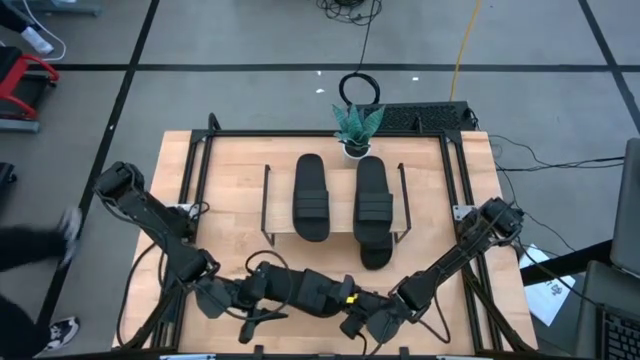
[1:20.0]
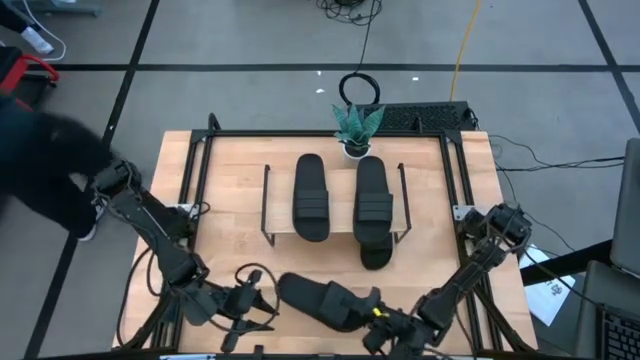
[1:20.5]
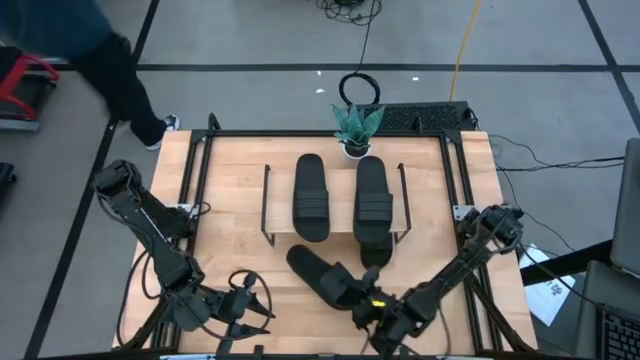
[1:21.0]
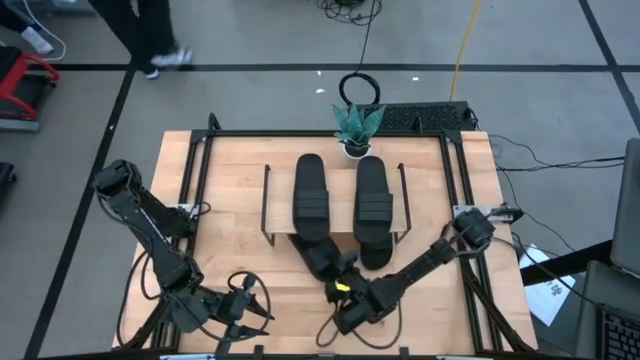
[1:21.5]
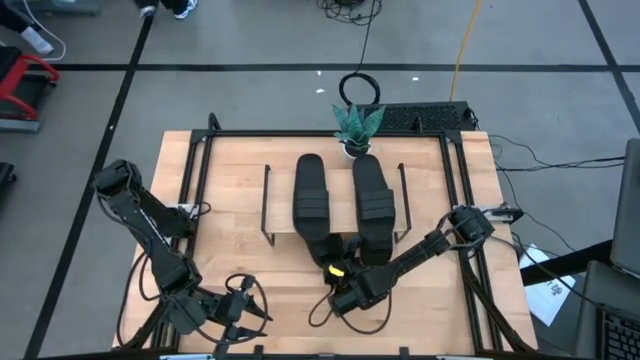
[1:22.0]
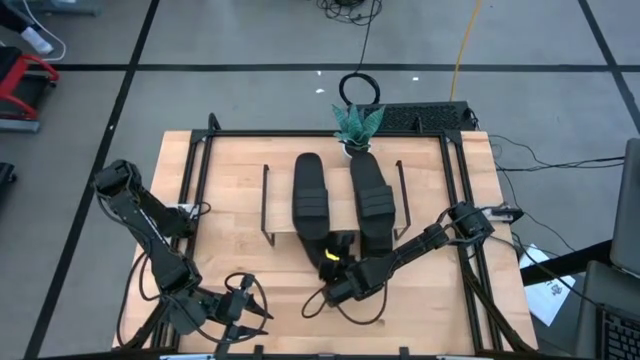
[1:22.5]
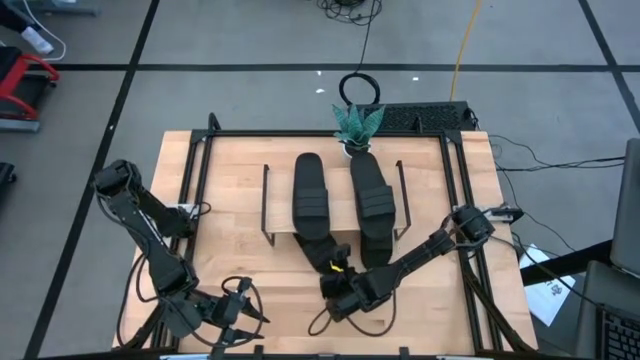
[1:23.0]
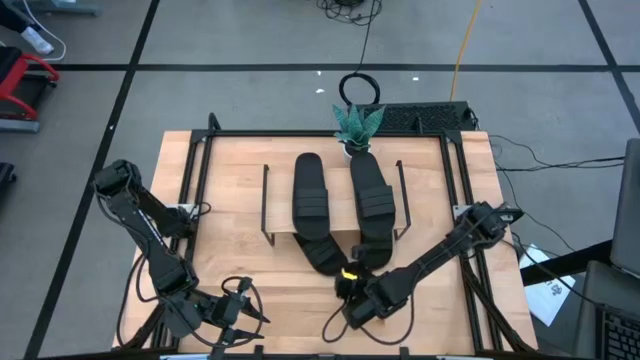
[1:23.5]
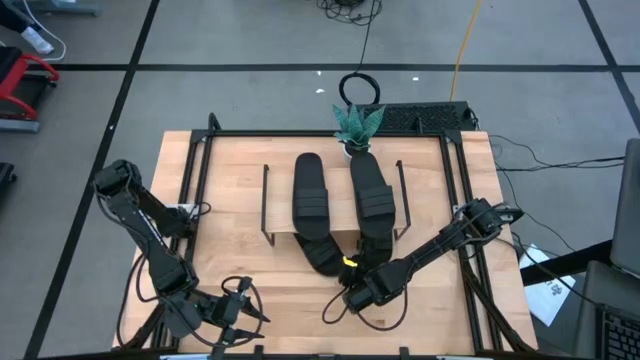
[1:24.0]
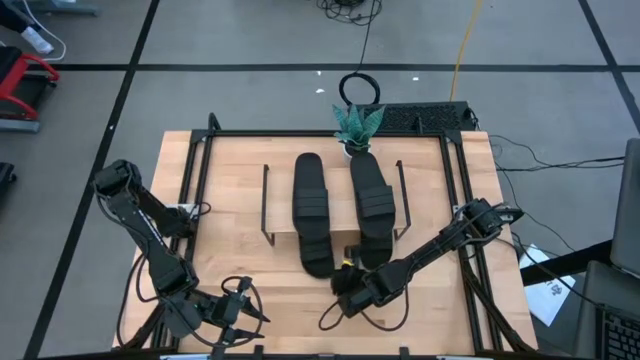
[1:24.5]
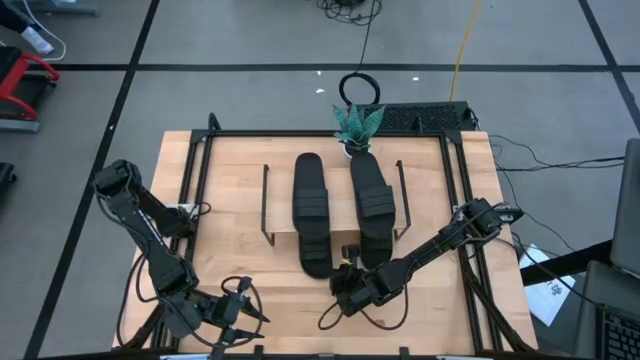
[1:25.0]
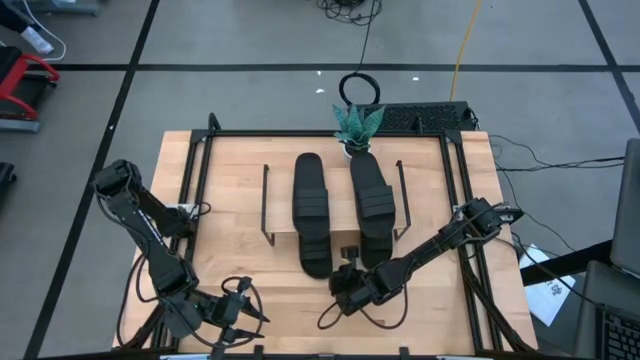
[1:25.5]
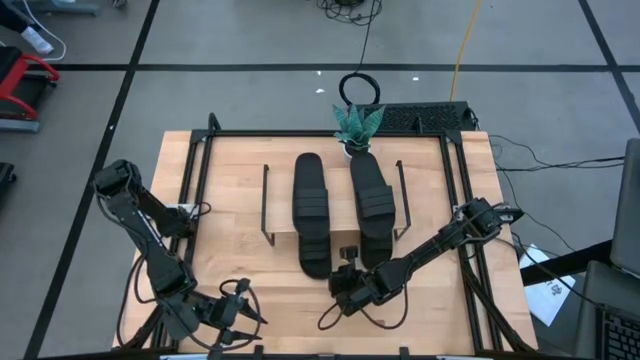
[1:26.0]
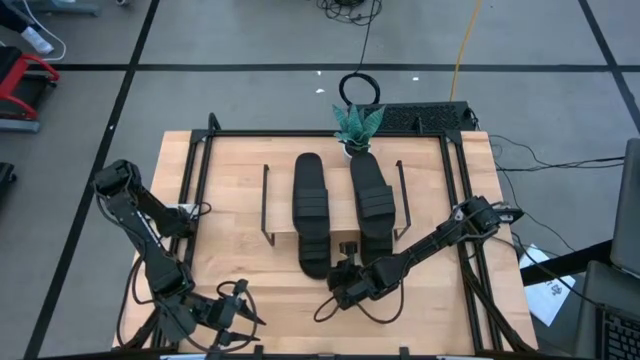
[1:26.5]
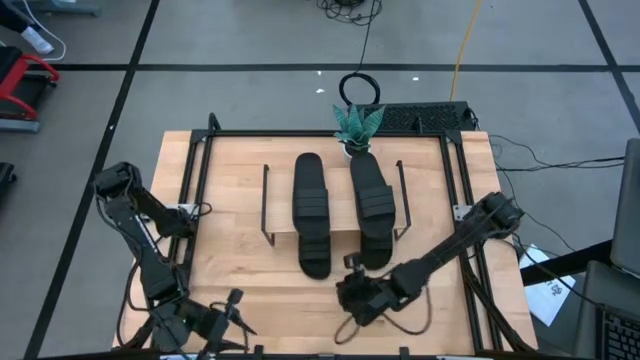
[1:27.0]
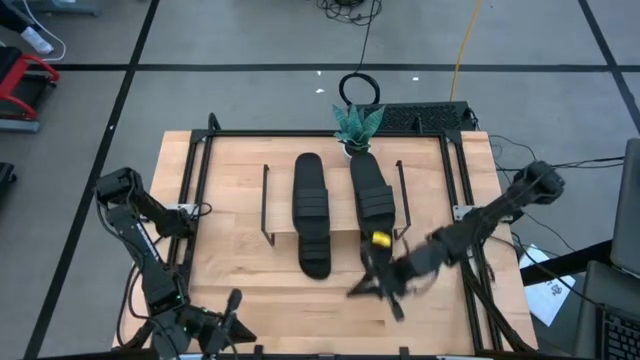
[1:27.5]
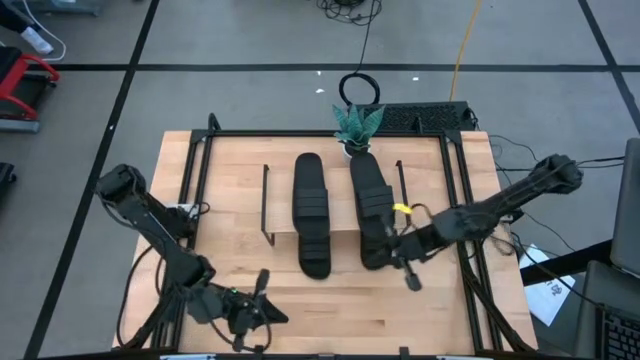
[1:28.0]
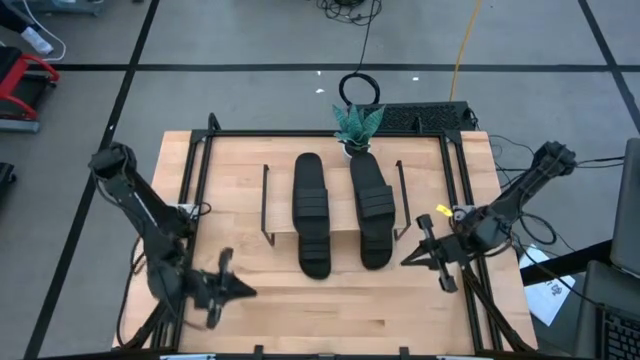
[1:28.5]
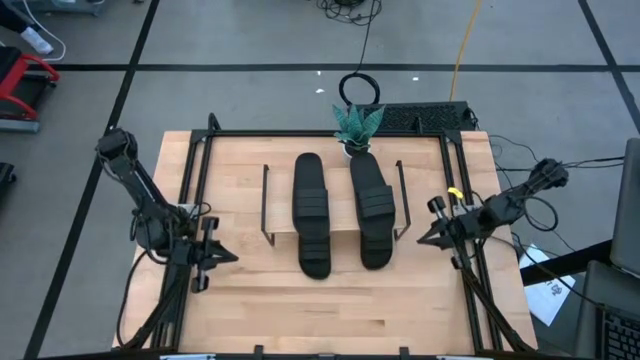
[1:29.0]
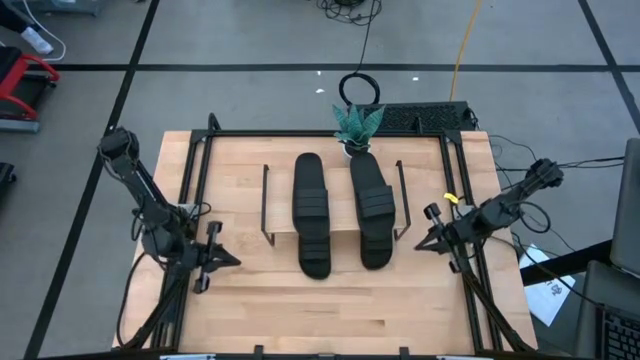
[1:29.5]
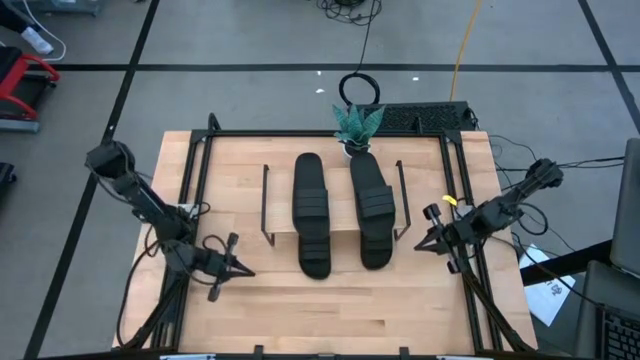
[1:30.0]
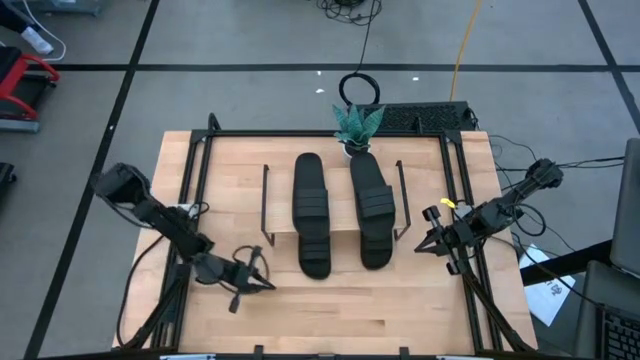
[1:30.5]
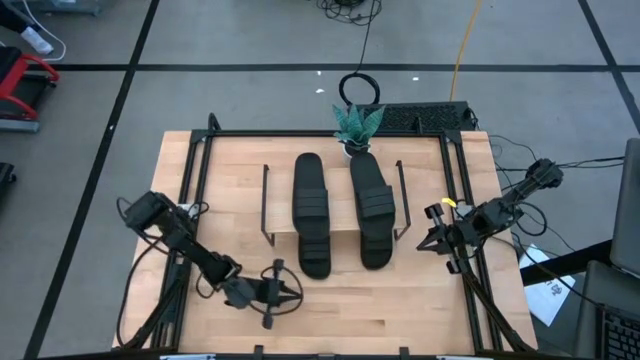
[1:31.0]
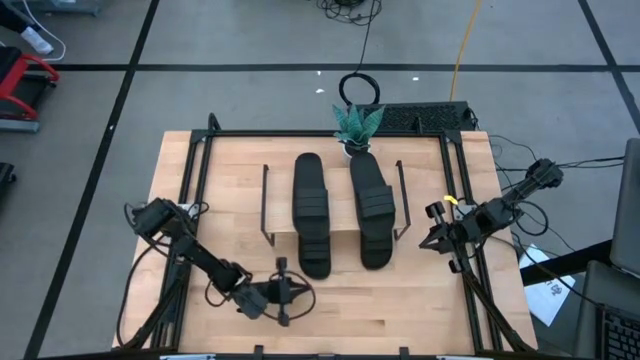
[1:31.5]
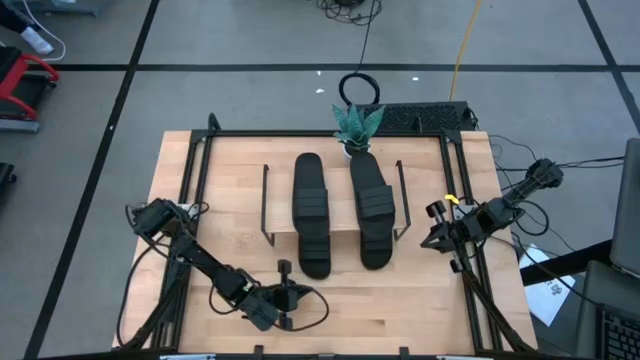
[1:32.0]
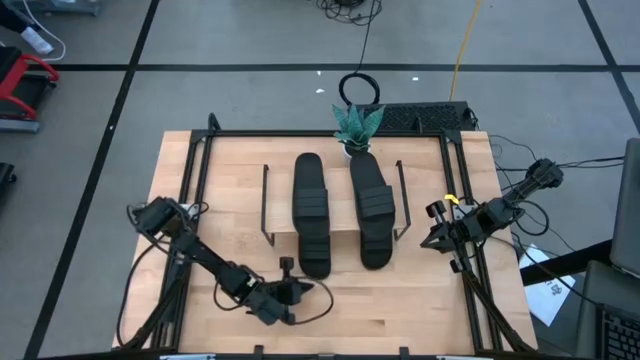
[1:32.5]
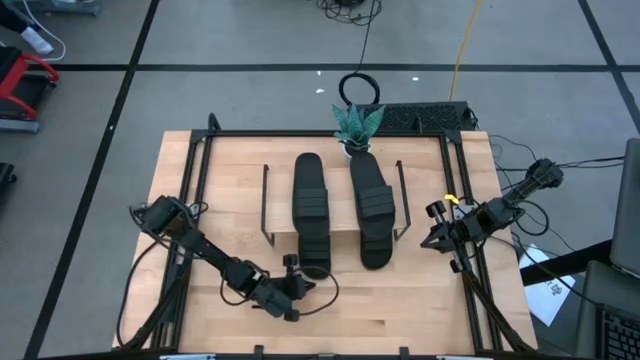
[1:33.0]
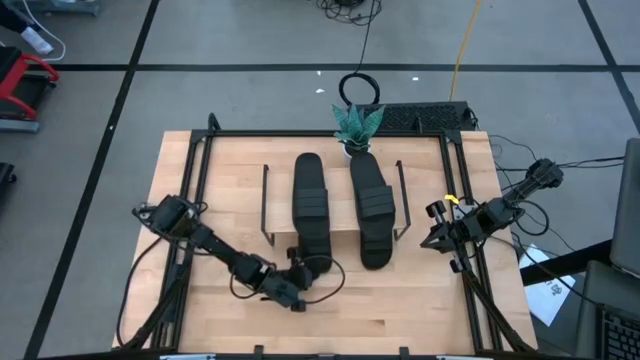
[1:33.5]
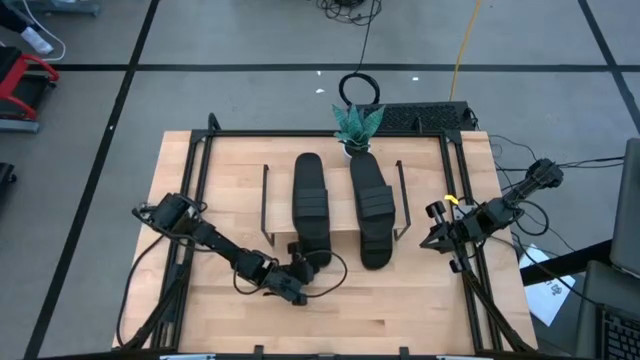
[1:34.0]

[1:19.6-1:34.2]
Task: Pick and place slides into the shelf
Put the black slide under the shelf

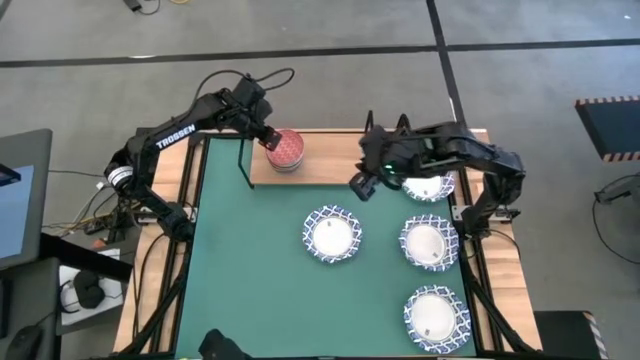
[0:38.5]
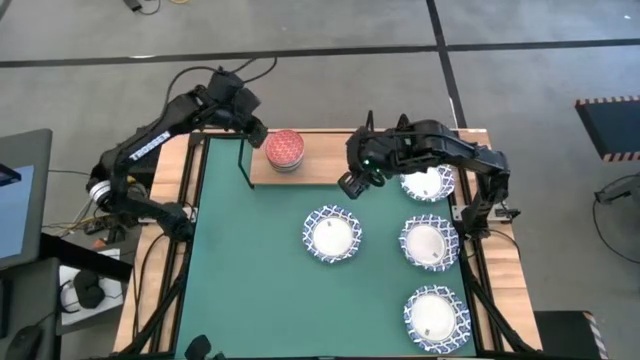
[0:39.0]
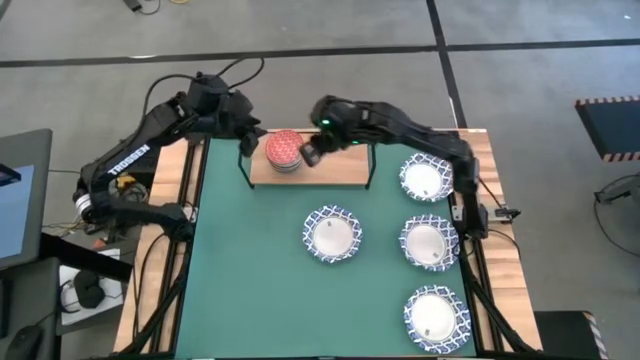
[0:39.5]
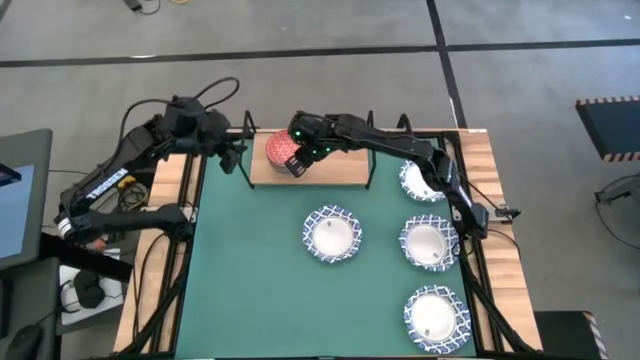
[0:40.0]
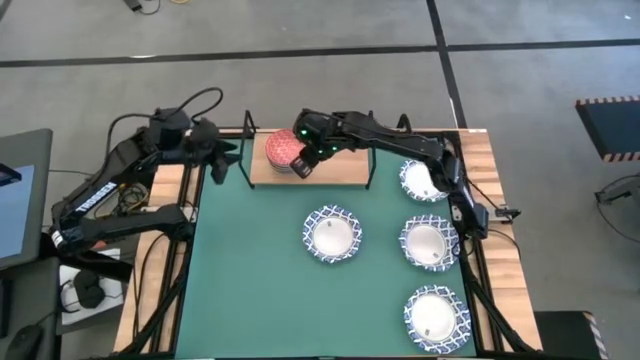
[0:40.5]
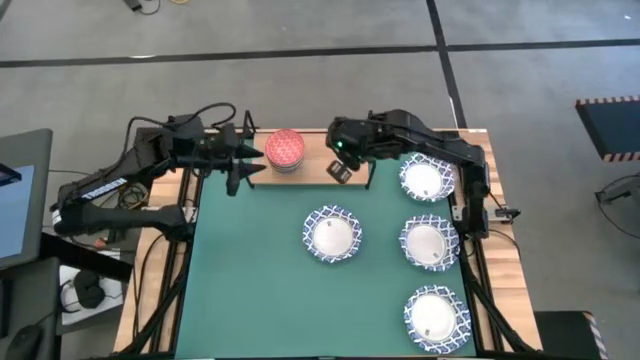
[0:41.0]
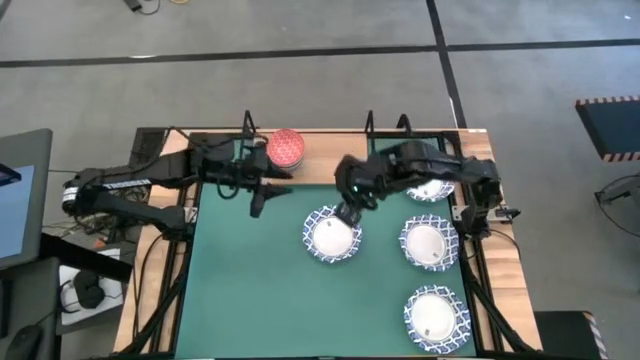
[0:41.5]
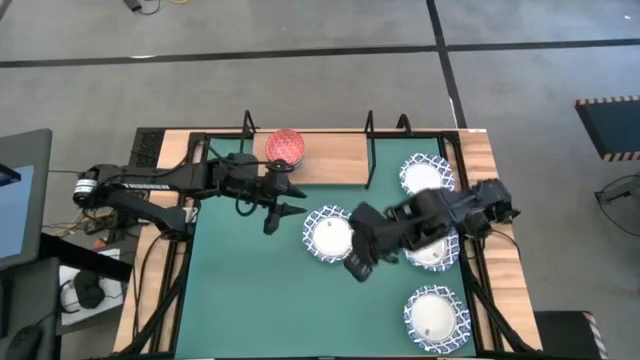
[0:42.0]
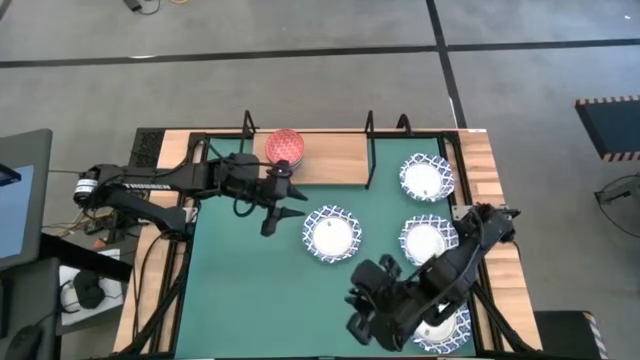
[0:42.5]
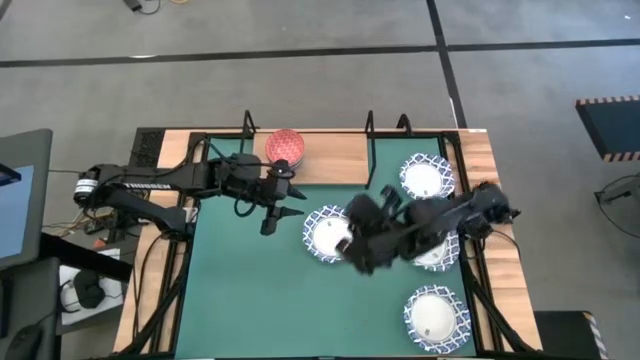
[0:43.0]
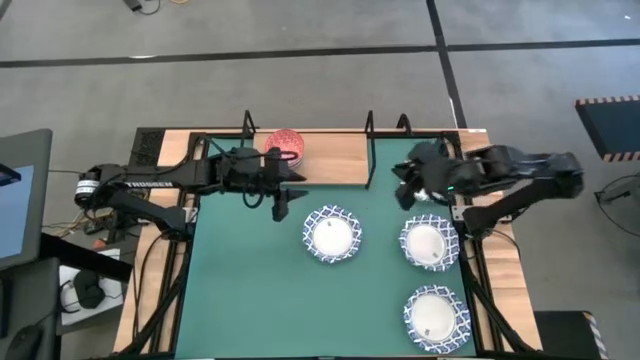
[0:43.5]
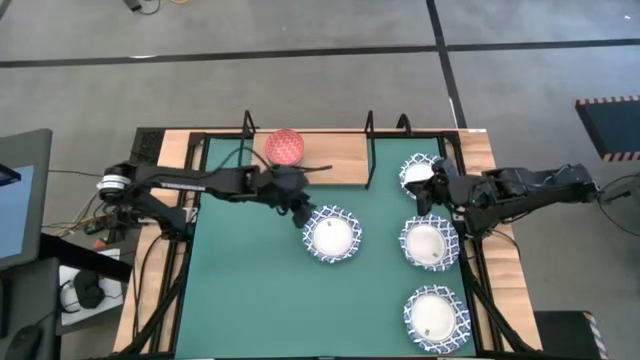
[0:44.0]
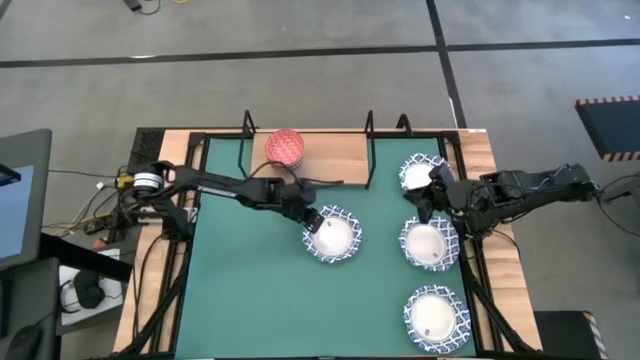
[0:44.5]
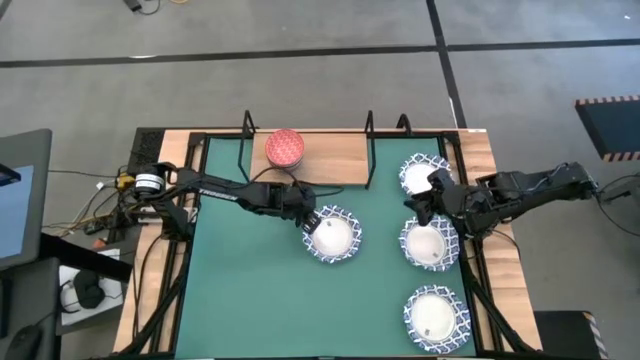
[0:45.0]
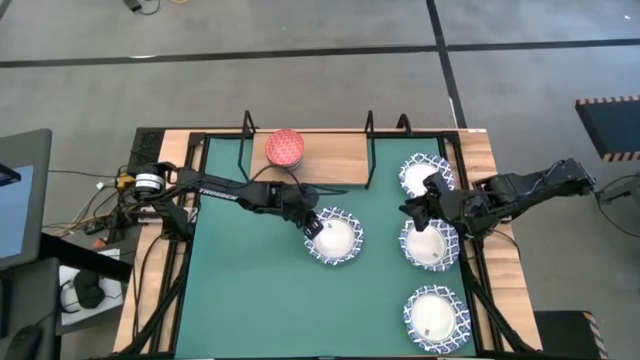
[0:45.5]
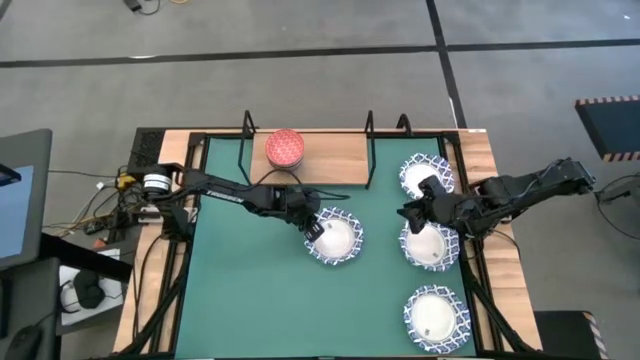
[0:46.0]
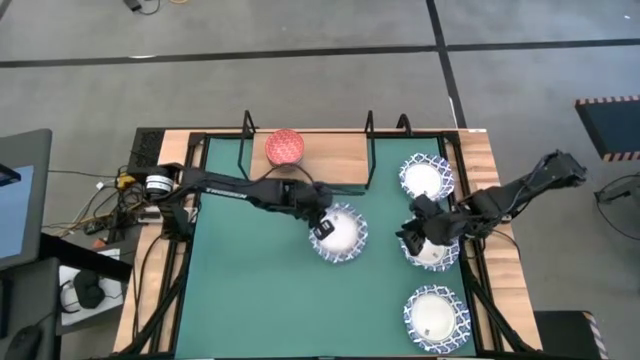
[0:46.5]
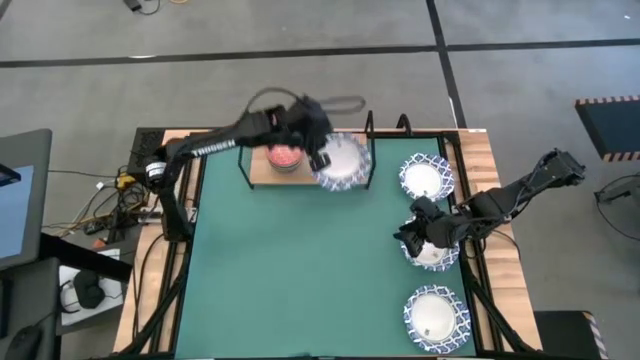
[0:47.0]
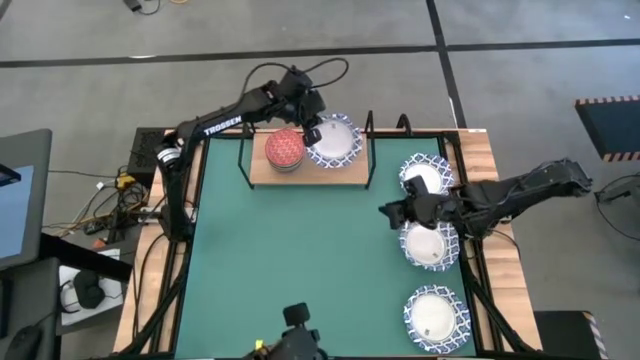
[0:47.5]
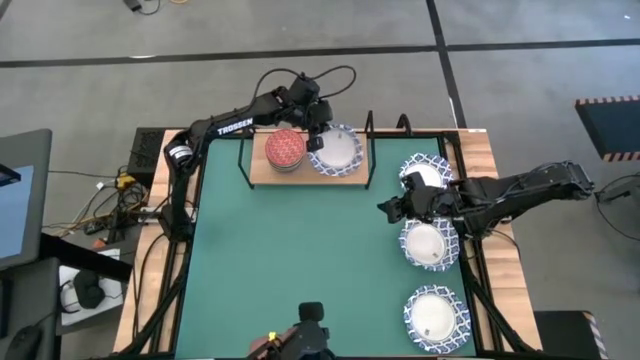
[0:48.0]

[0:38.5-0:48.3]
Task: Place and stack bowls onto a shelf
Put the white blue bowl on the shelf
